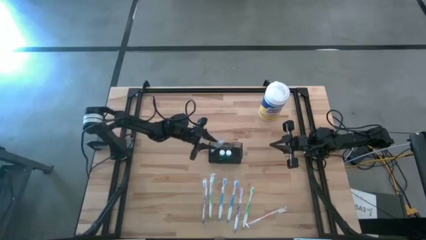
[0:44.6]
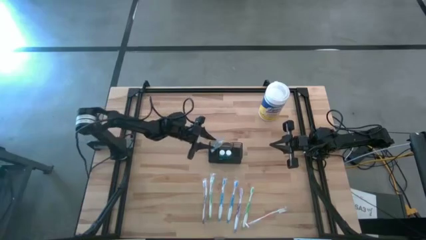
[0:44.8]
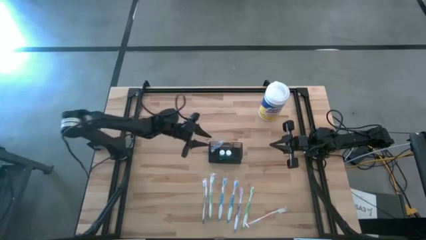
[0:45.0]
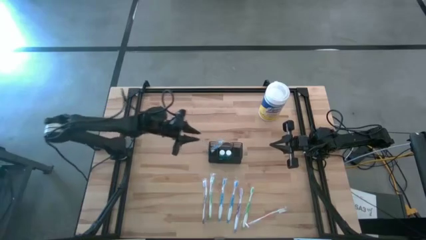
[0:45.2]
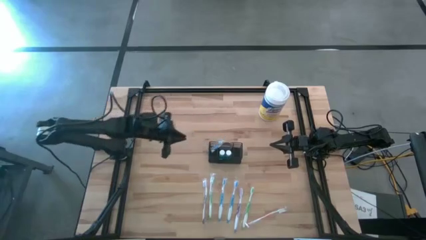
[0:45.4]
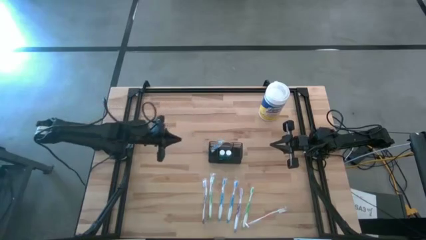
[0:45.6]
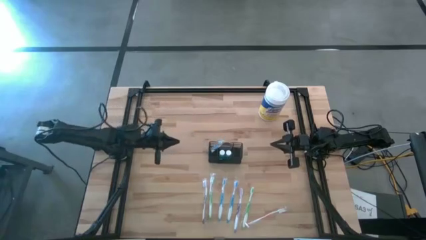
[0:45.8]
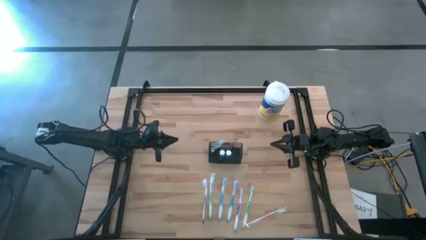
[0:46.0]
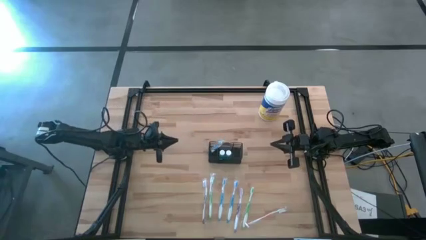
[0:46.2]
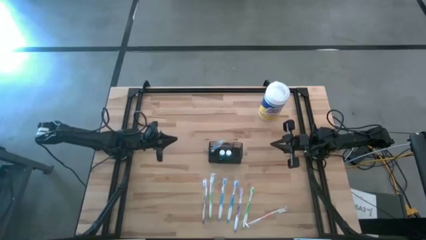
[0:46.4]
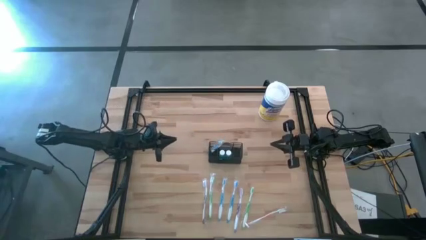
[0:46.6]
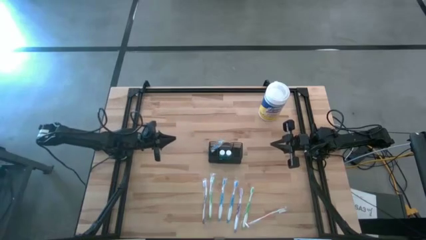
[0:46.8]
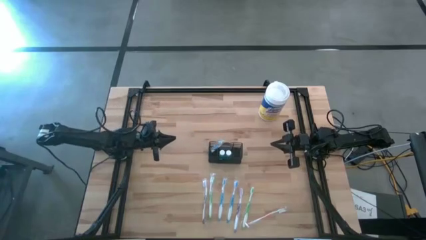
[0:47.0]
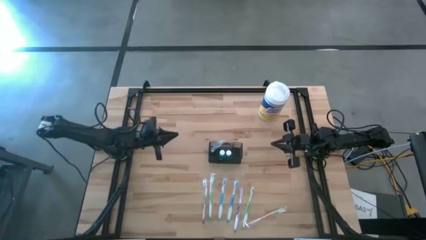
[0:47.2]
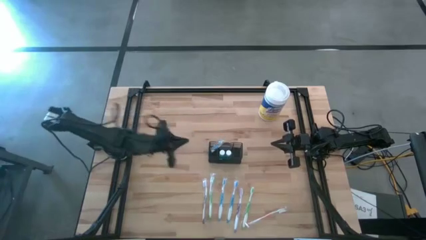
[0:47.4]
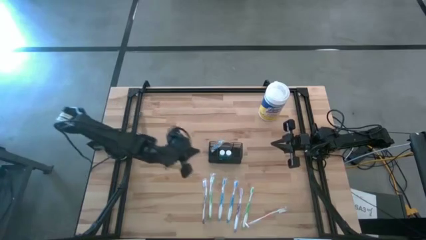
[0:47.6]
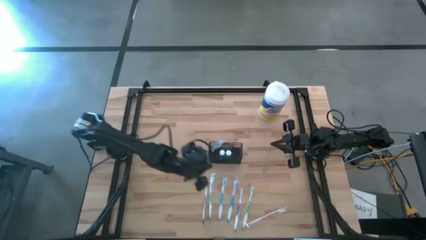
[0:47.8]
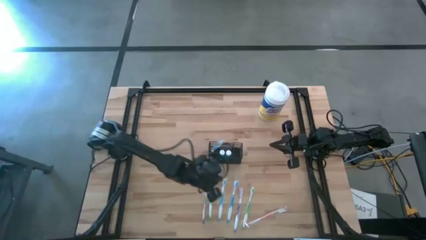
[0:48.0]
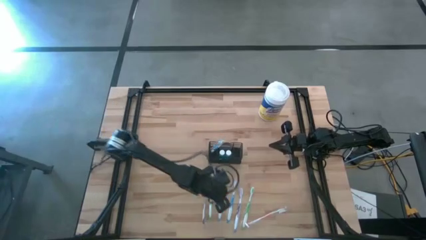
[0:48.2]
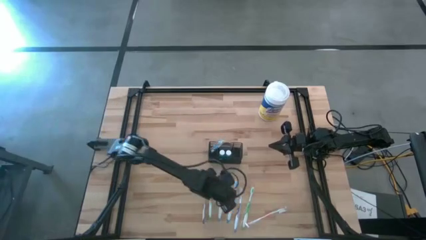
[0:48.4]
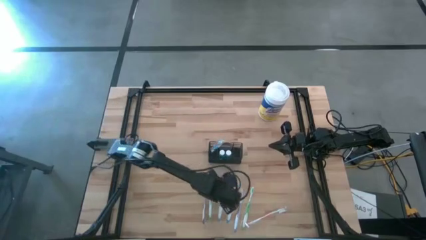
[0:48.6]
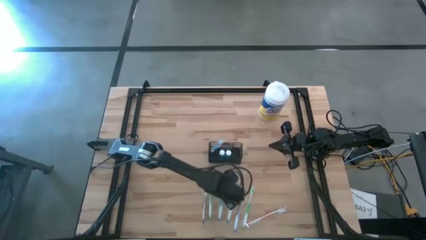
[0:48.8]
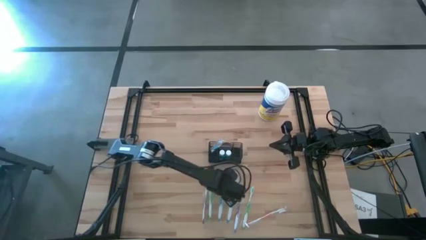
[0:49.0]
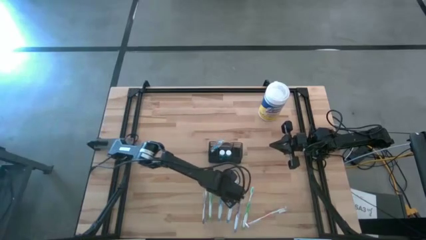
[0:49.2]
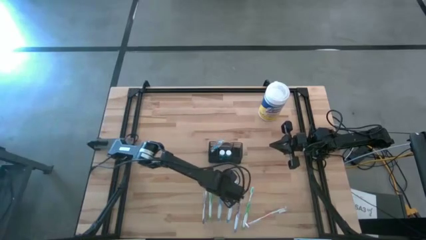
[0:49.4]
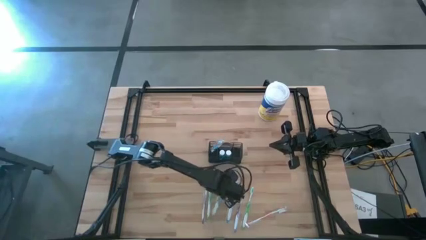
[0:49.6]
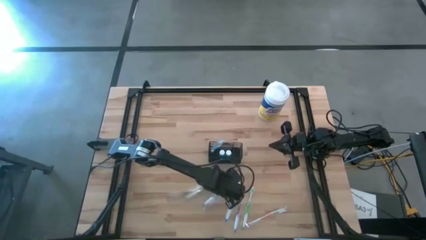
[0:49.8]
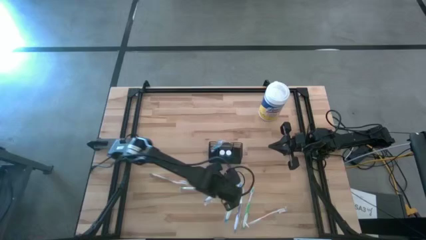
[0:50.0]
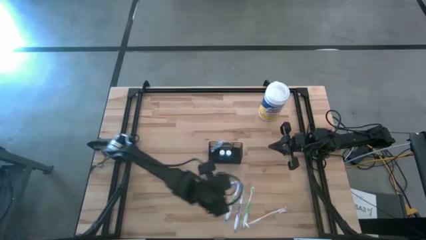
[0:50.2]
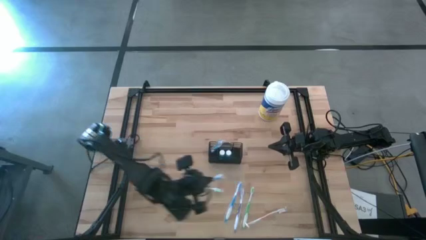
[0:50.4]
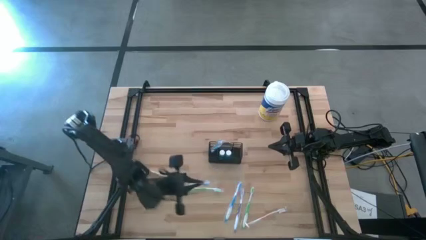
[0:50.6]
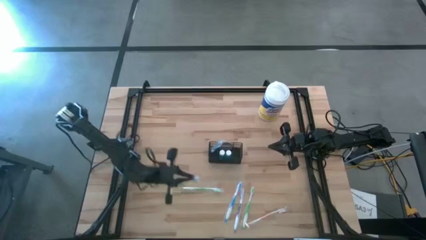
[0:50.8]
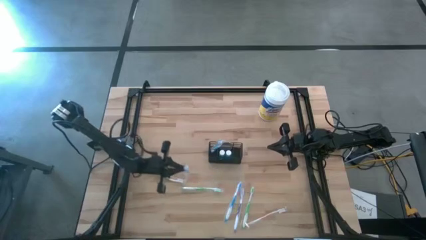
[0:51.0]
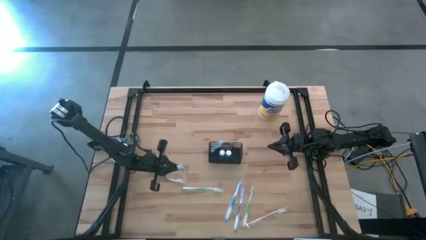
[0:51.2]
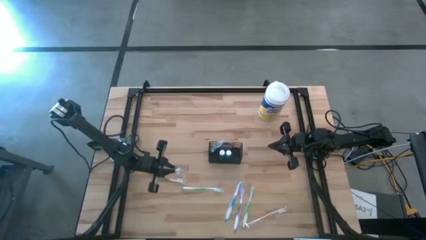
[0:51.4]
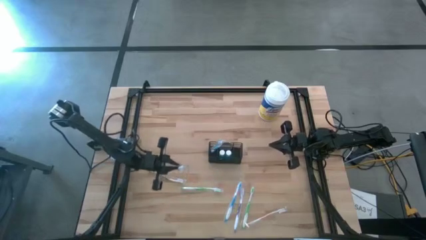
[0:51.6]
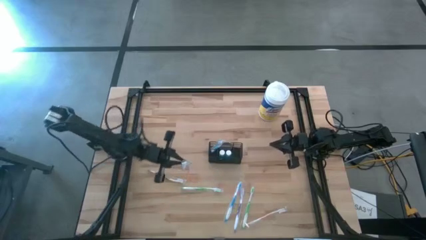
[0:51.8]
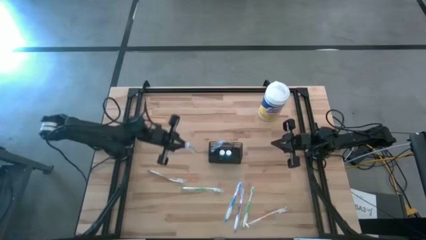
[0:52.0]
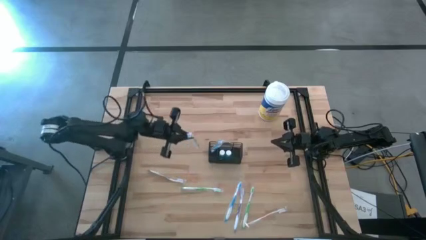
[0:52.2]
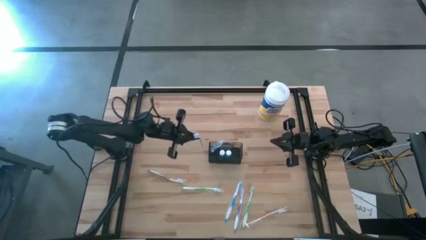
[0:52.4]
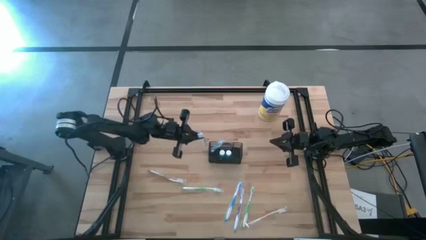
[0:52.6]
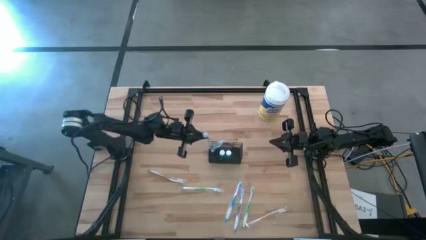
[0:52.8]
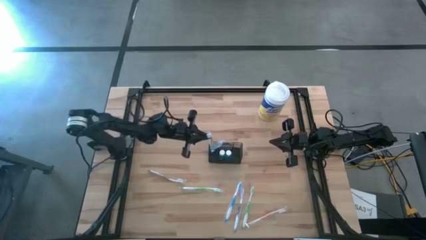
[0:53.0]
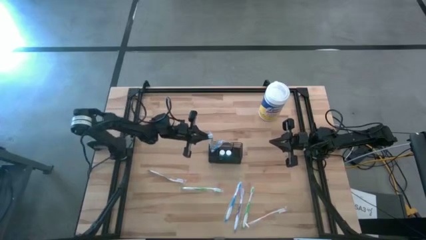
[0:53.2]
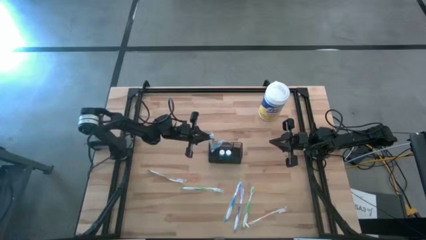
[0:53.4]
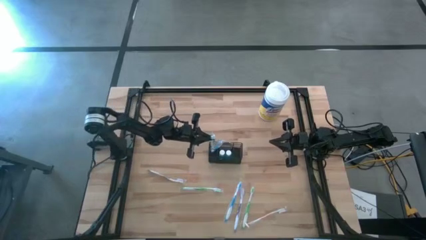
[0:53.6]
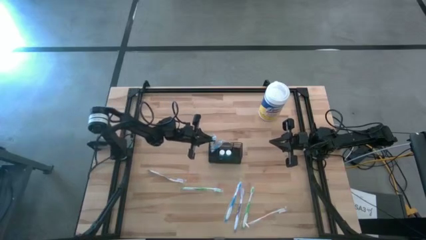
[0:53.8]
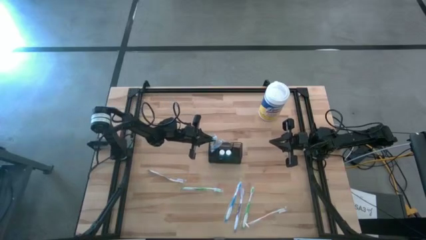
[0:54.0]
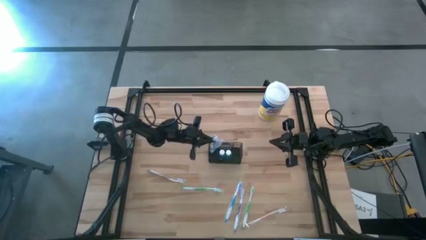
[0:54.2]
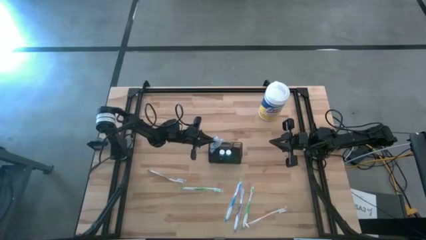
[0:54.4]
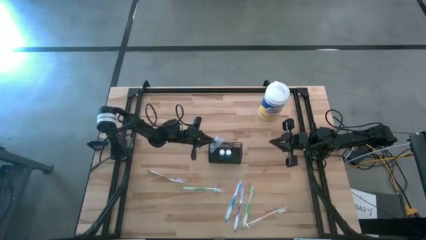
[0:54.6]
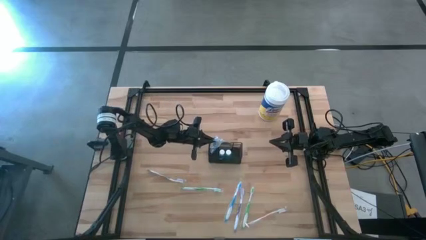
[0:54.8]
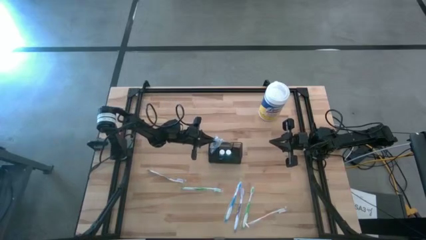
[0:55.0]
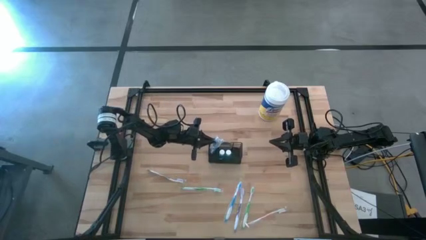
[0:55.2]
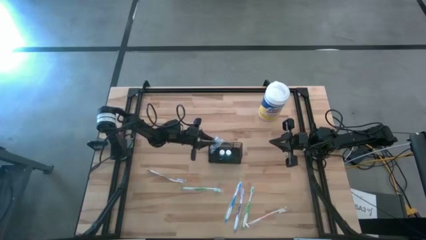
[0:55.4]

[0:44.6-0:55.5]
Task: Pick & Place toothbrushing station
Put the blue toothbrush into the wire organizer
